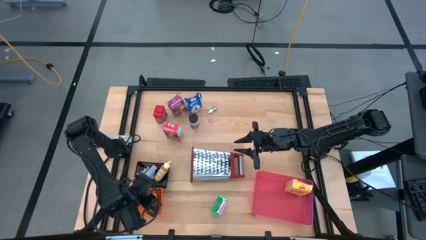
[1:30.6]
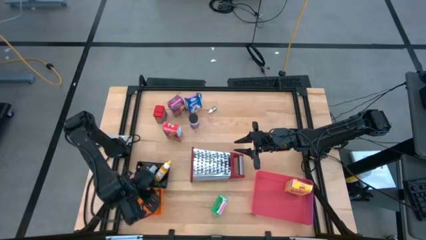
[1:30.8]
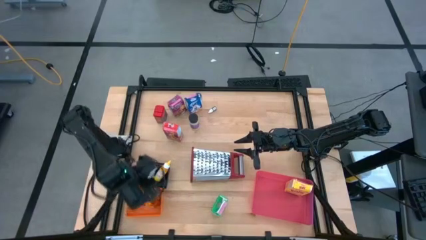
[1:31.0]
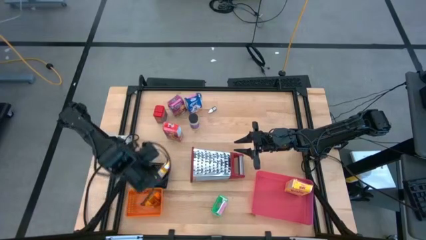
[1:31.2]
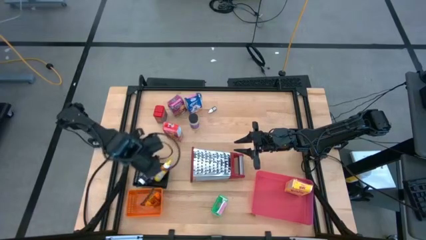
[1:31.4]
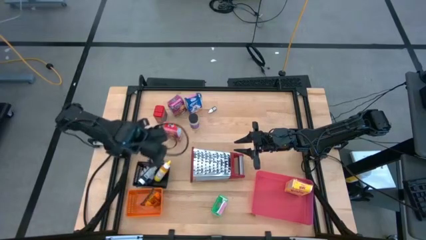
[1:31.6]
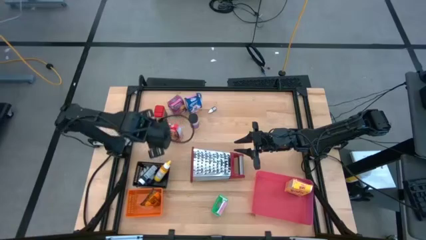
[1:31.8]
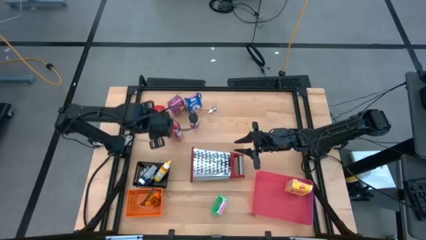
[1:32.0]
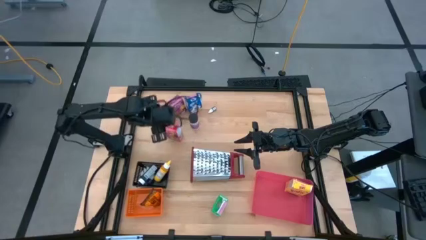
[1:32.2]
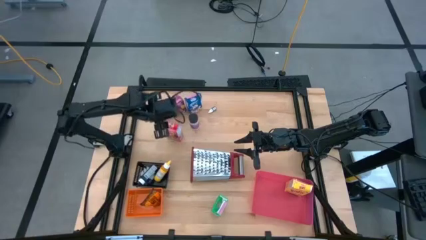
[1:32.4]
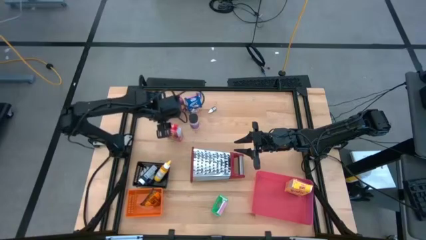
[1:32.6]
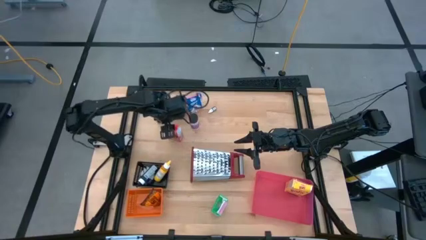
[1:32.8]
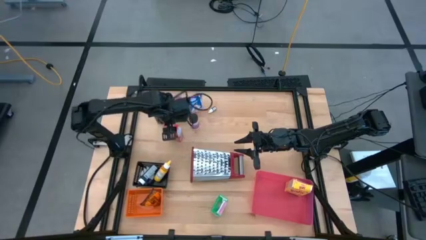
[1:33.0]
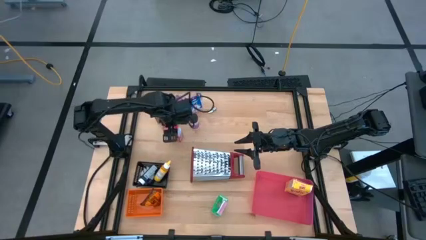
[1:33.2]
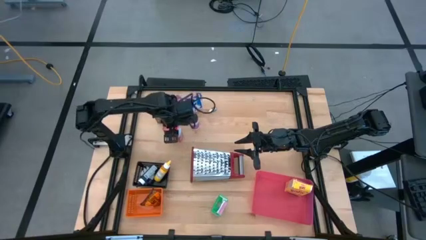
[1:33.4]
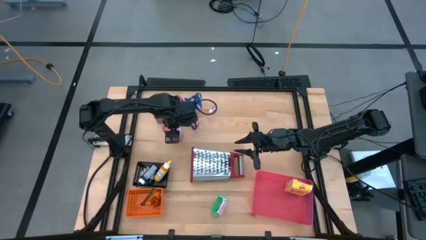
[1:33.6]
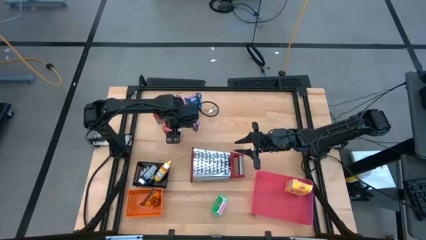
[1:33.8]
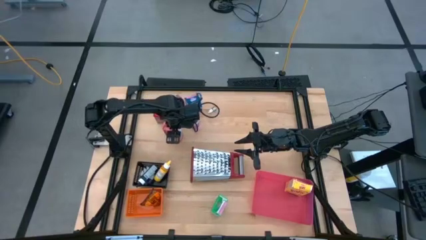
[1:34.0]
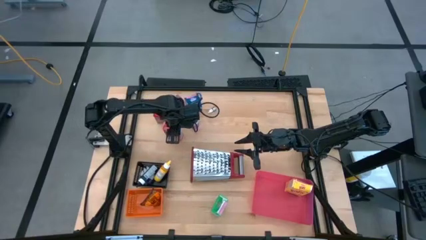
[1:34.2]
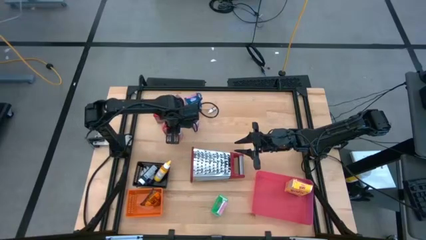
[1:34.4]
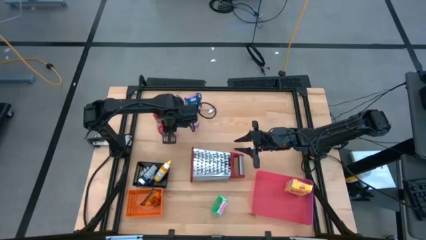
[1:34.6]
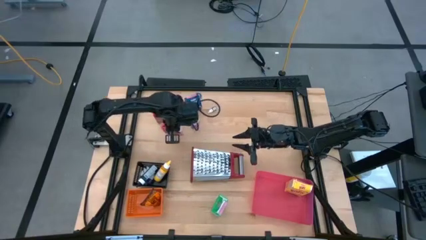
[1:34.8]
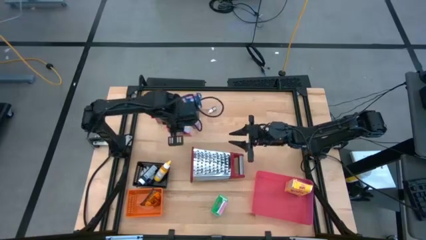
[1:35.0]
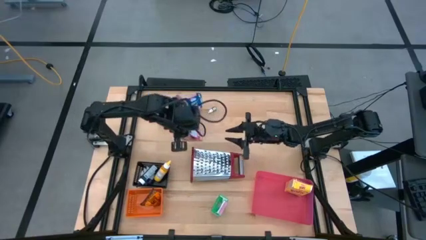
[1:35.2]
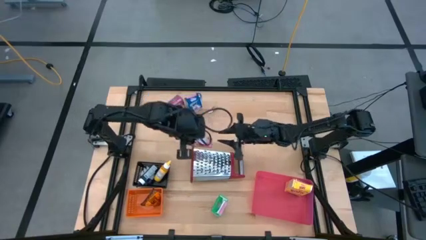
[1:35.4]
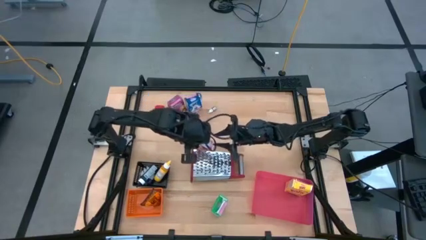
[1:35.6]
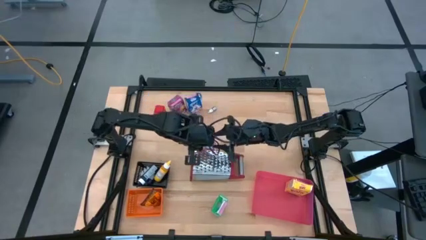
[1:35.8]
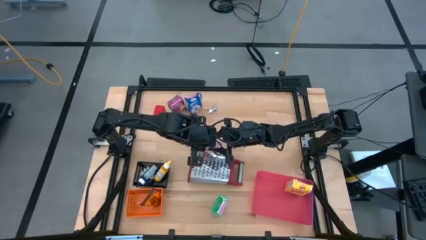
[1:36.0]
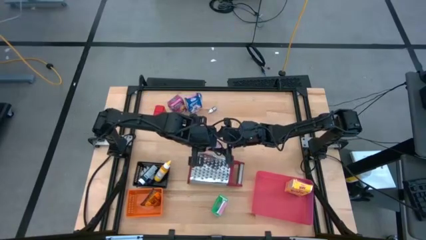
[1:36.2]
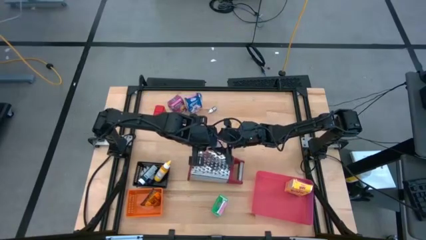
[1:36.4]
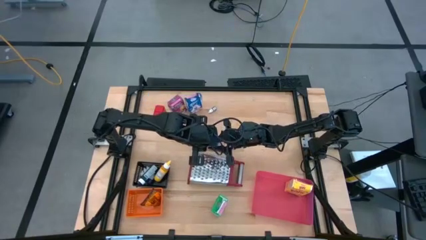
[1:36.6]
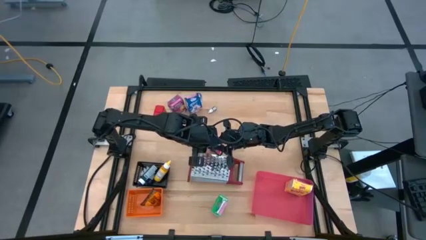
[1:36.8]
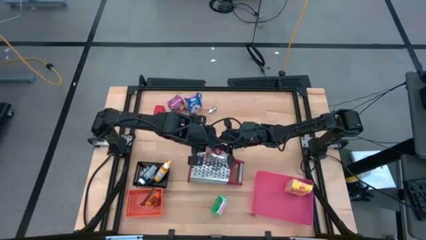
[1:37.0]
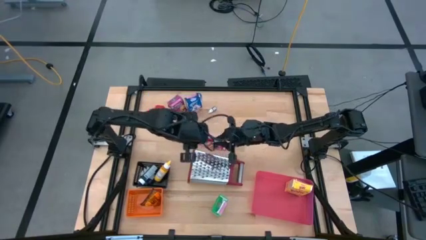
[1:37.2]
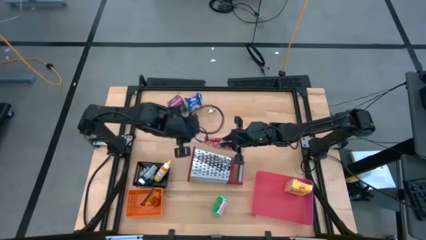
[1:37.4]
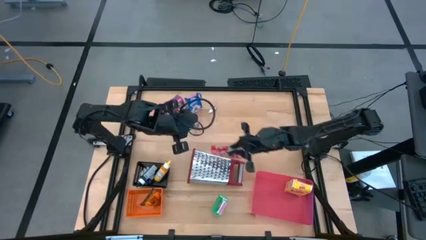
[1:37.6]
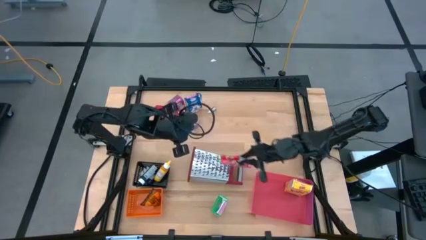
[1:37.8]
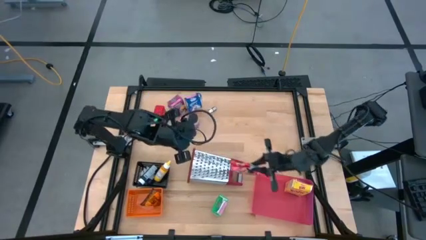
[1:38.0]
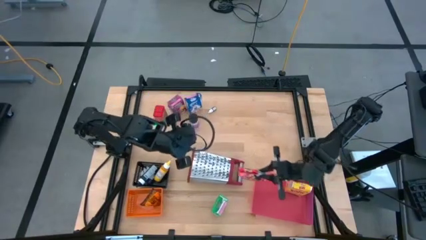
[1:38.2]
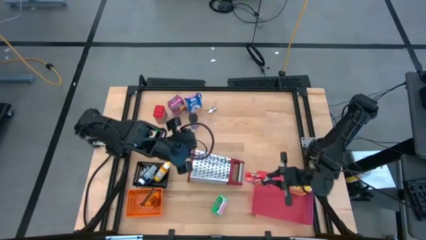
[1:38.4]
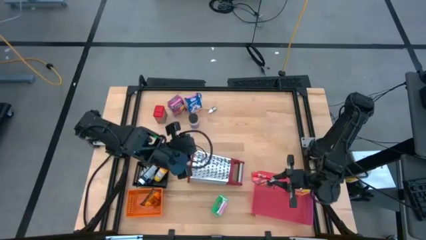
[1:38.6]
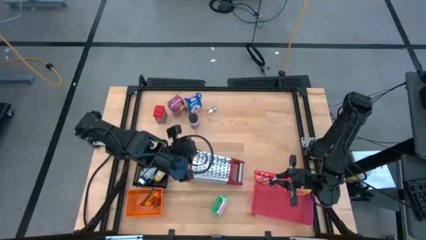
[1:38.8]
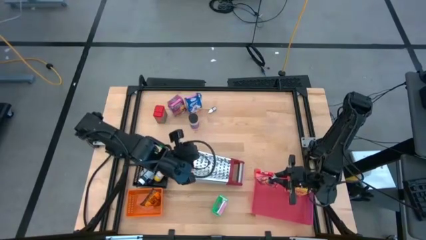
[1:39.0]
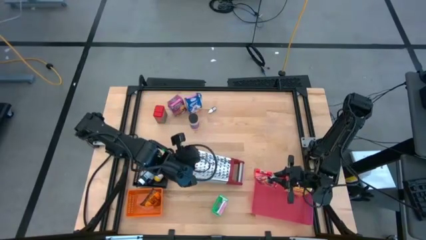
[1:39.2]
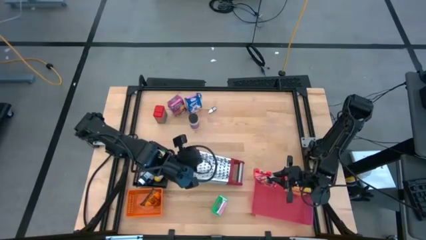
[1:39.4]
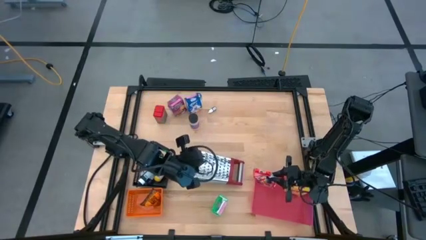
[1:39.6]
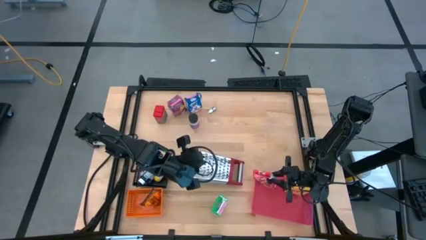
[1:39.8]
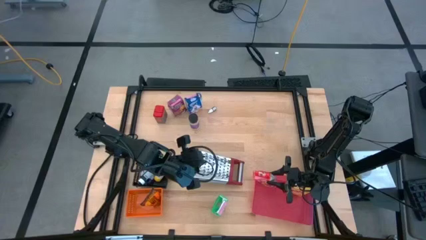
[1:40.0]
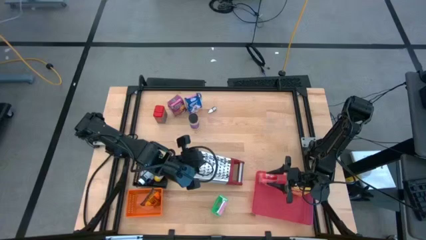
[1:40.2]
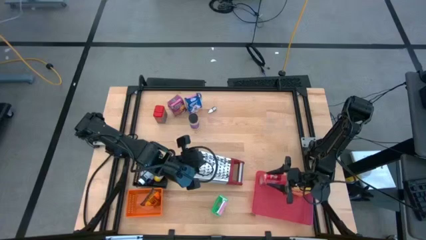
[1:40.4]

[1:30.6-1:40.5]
Task: Pick & Place Kitchen Items
Put the red cereal box into the pink bin

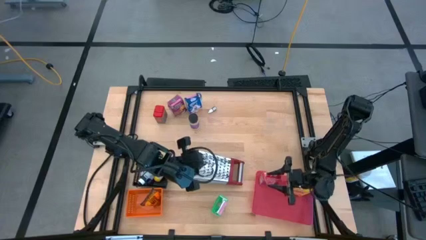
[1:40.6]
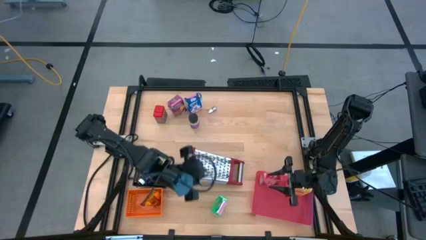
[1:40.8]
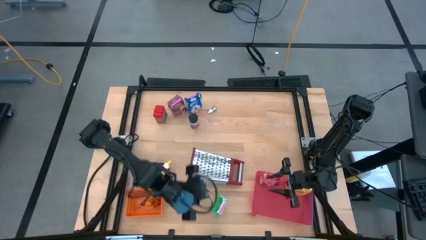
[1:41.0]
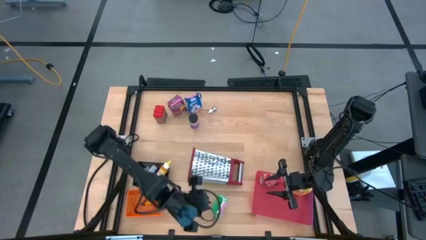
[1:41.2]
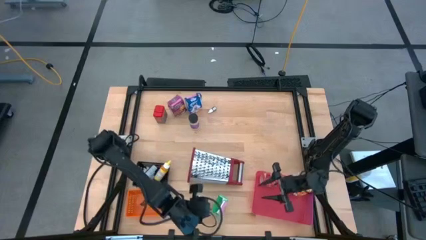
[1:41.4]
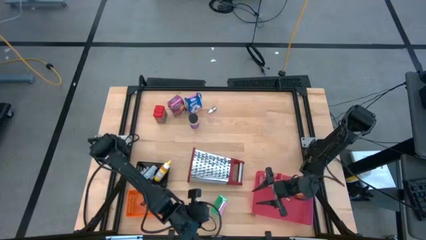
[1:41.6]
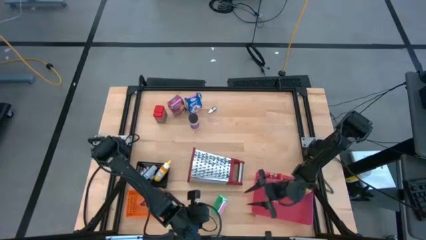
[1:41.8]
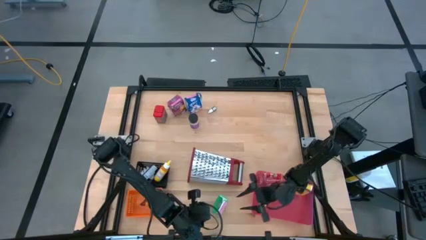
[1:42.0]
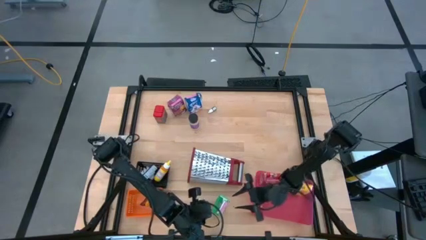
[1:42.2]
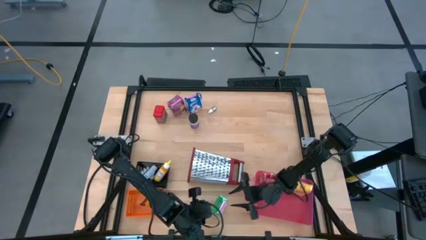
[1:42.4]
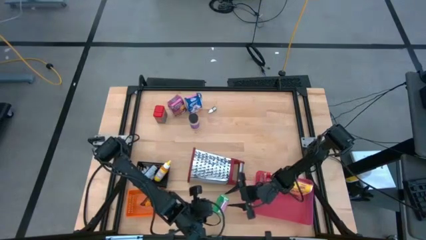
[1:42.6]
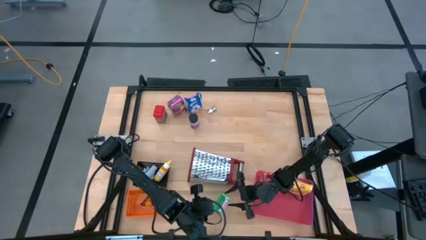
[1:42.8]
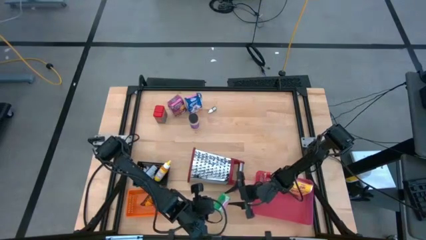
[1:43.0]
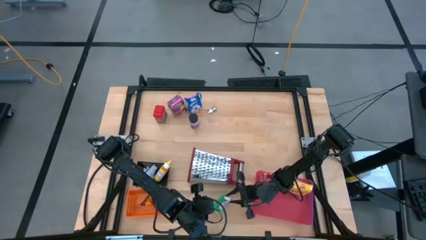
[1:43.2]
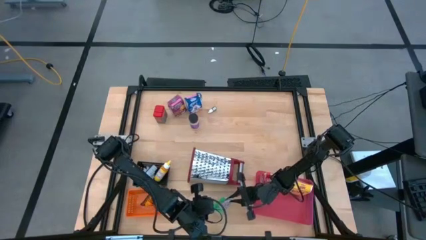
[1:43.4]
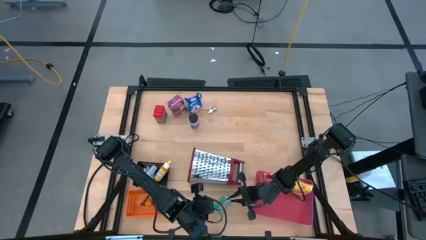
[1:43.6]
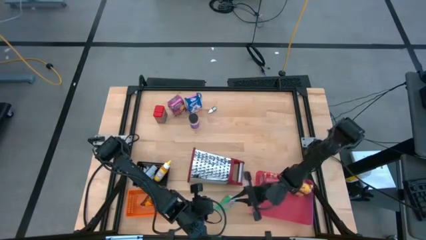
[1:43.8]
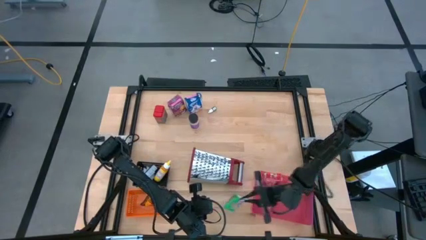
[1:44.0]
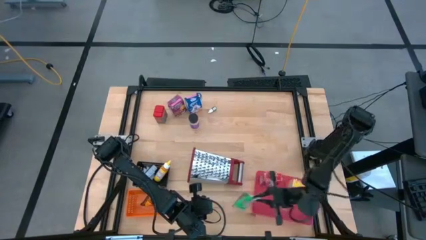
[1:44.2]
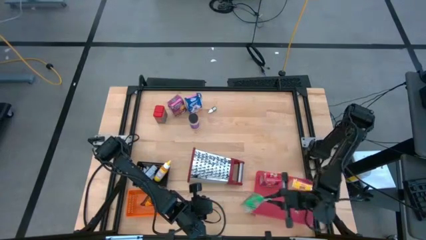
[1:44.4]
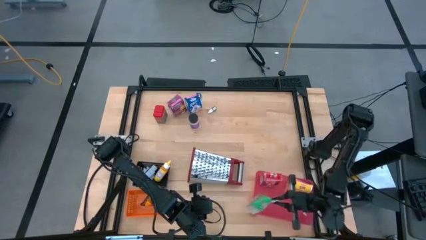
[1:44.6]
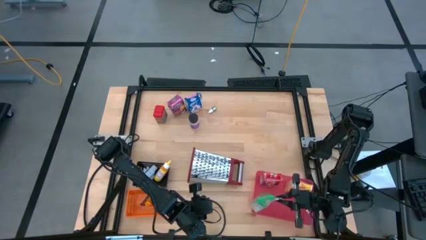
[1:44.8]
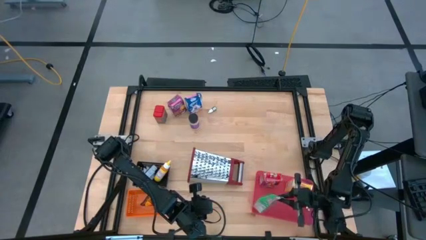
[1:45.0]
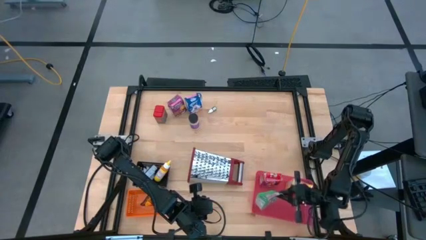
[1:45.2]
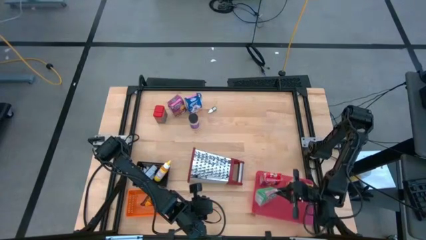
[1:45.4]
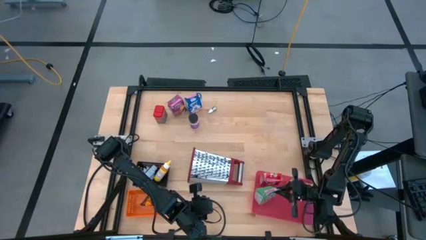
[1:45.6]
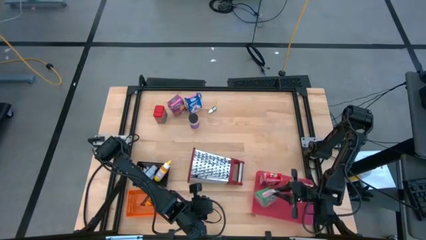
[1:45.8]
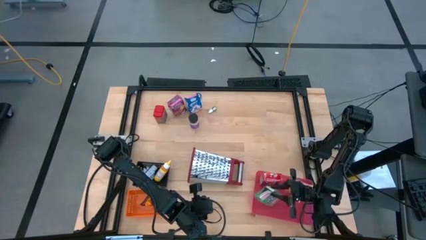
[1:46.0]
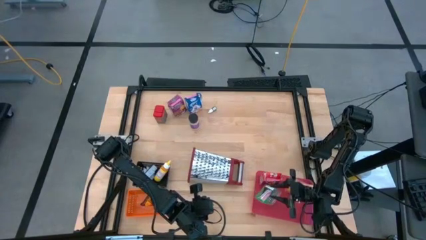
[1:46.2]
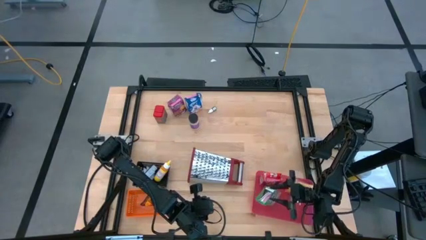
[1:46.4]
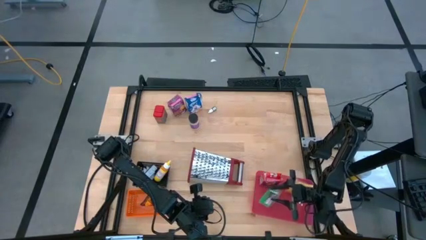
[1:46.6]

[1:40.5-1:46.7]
Put the green cereal box into the pink bin
